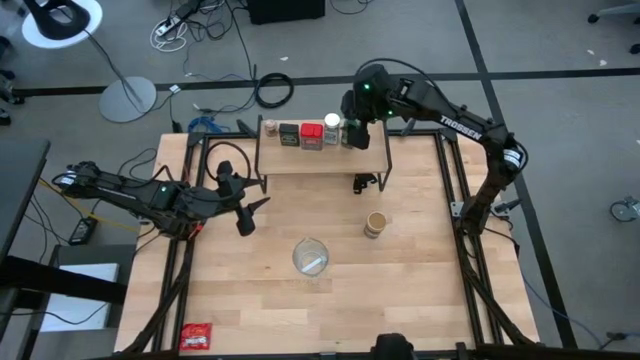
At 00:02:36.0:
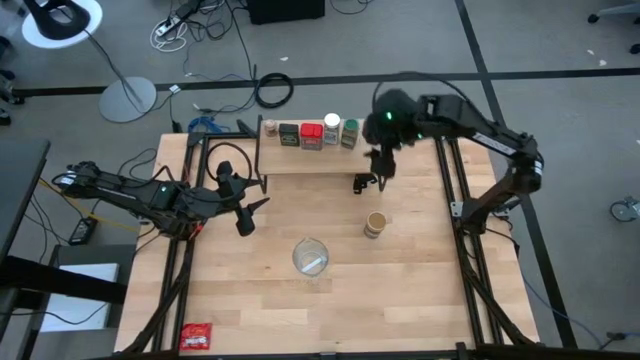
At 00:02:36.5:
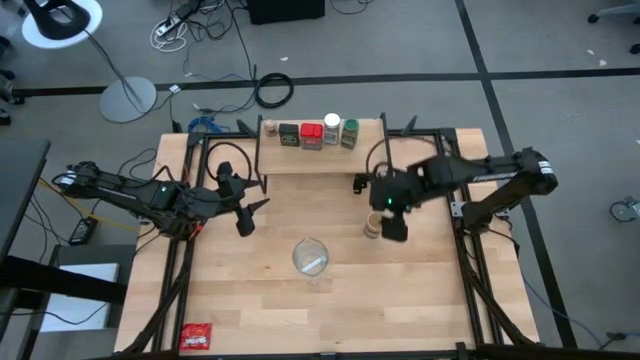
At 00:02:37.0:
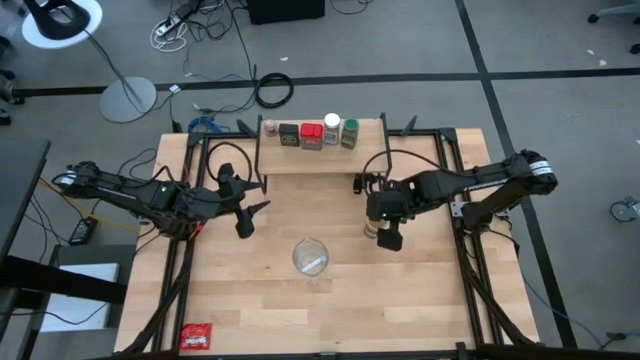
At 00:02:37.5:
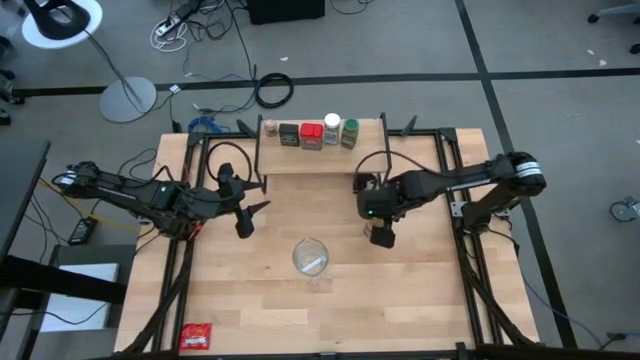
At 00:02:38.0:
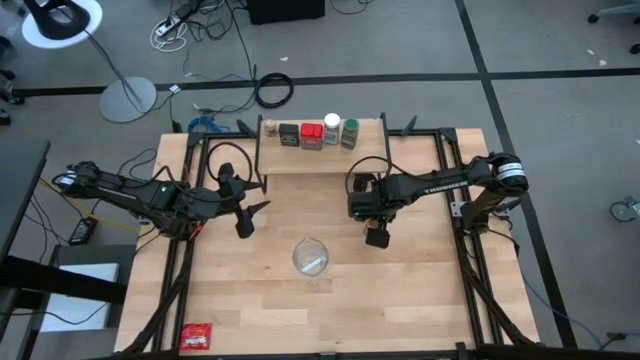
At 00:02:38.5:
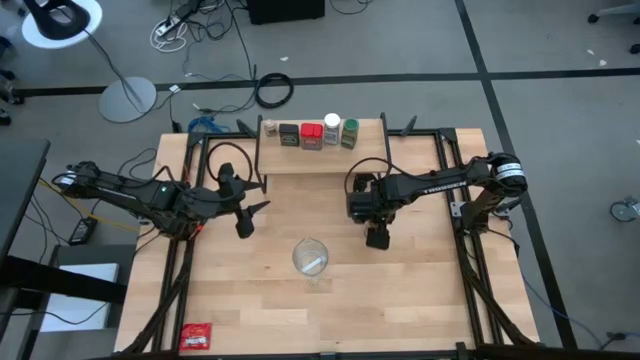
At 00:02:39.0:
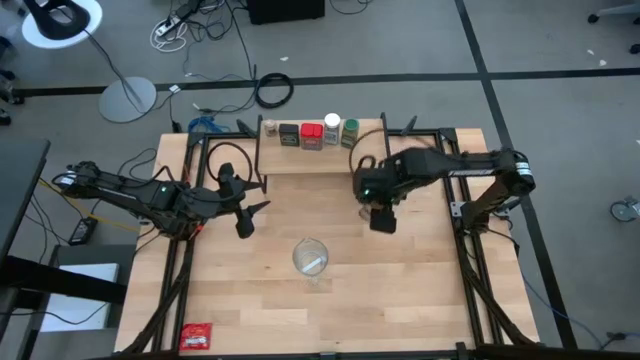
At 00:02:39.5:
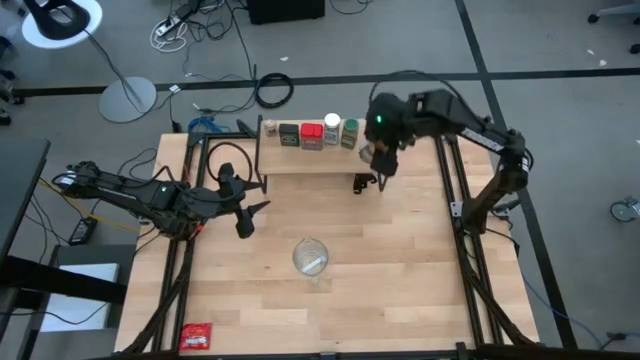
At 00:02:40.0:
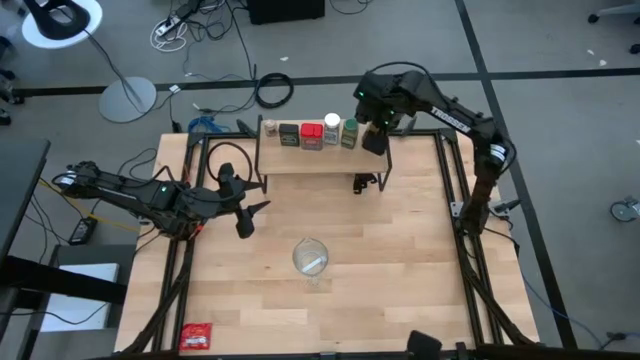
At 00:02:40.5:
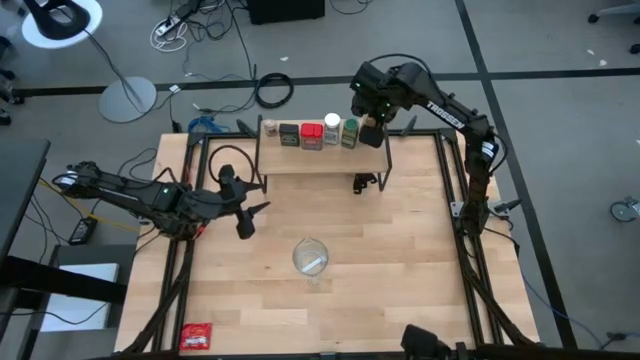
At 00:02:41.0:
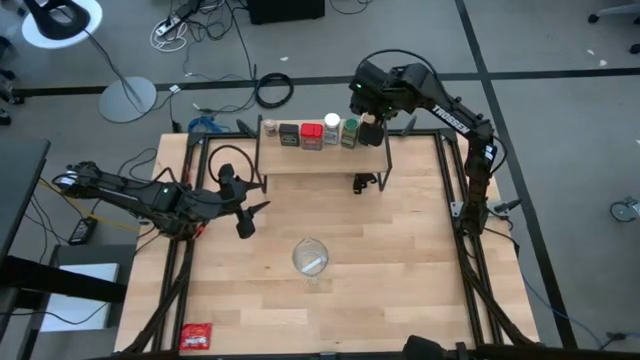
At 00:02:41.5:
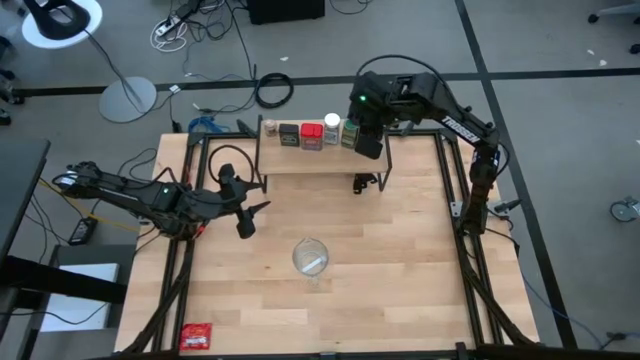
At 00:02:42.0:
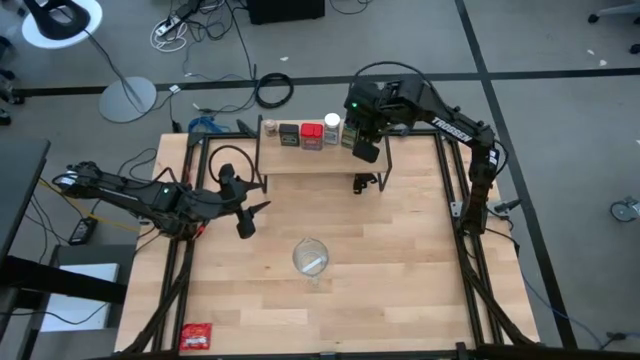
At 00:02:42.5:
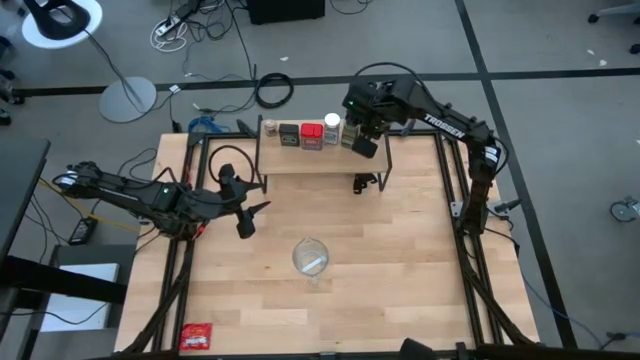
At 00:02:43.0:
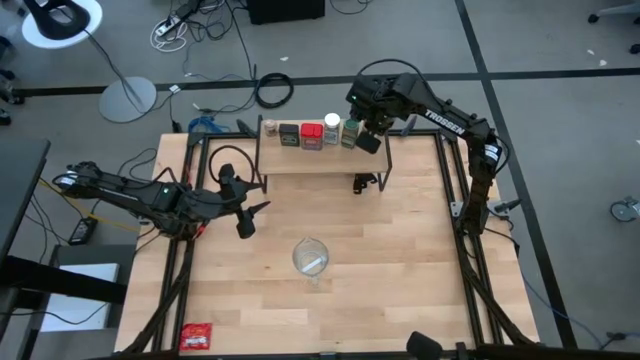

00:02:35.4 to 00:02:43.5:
Task: Shelf spices
Put the golden seasoning bottle on the shelf

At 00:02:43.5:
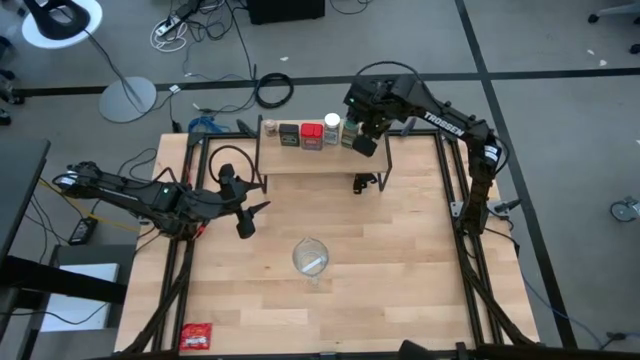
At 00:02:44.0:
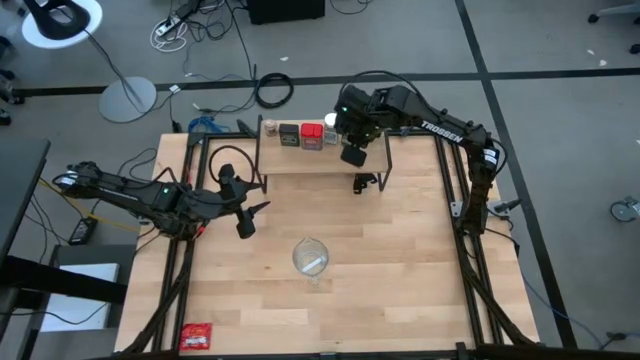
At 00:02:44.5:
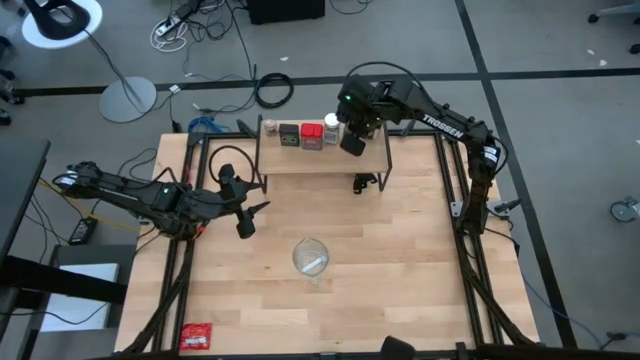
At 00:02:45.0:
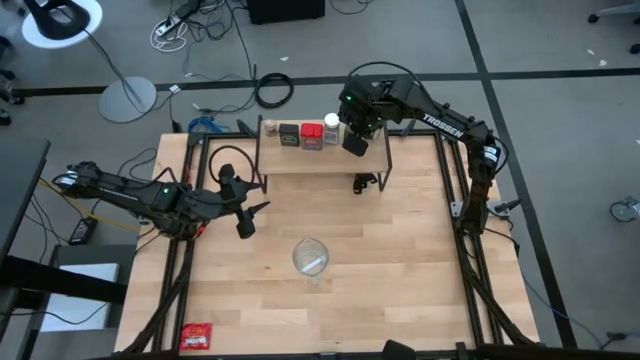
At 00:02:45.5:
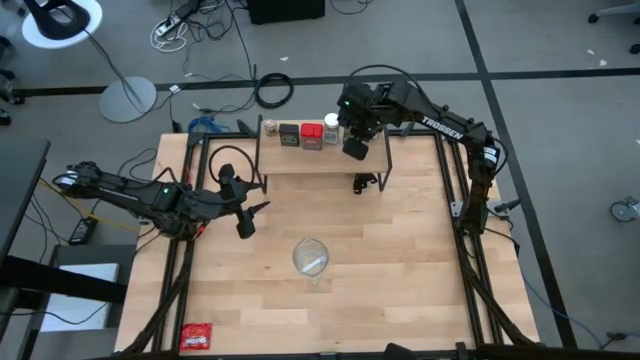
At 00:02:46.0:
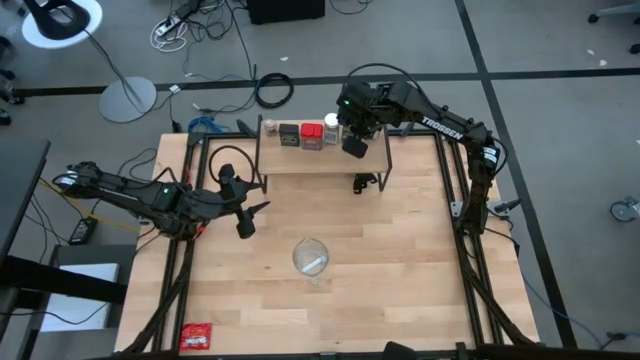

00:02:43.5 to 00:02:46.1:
Adjust the green seasoning bottle on the shelf

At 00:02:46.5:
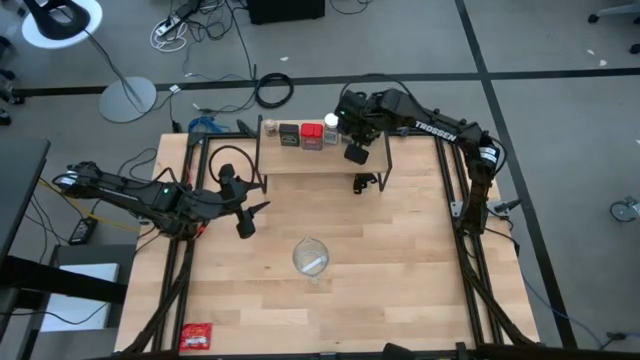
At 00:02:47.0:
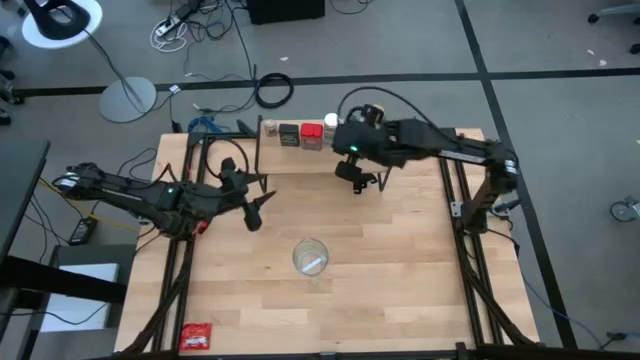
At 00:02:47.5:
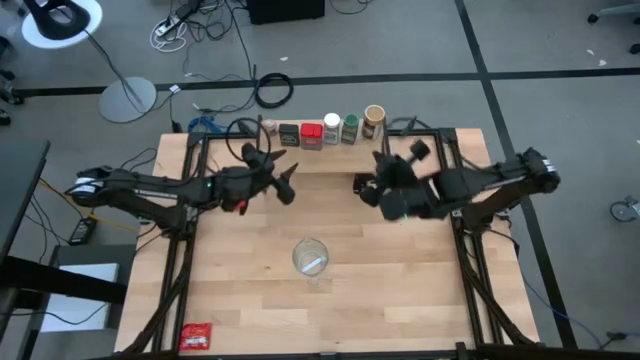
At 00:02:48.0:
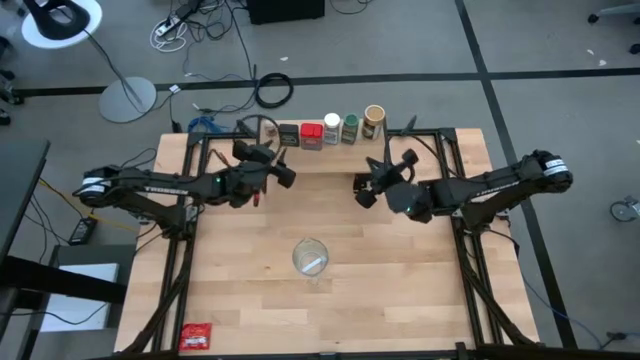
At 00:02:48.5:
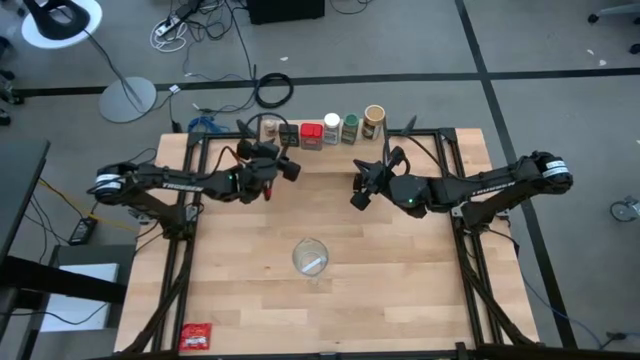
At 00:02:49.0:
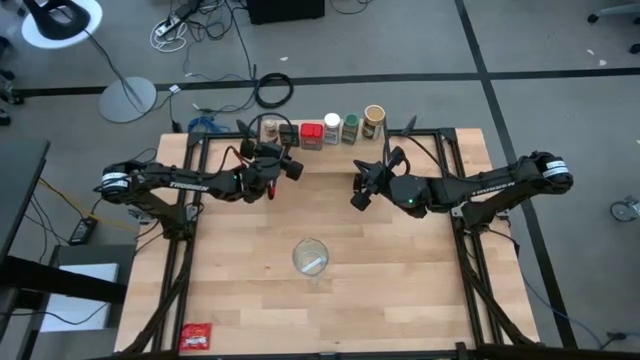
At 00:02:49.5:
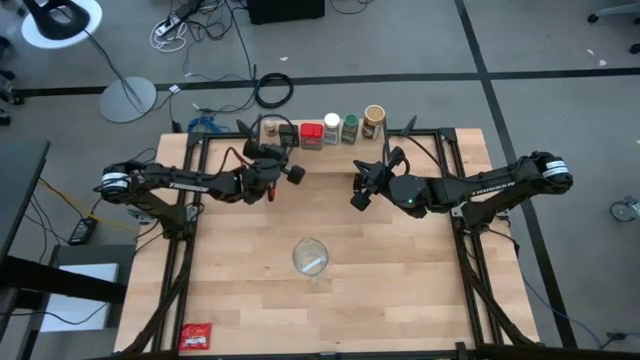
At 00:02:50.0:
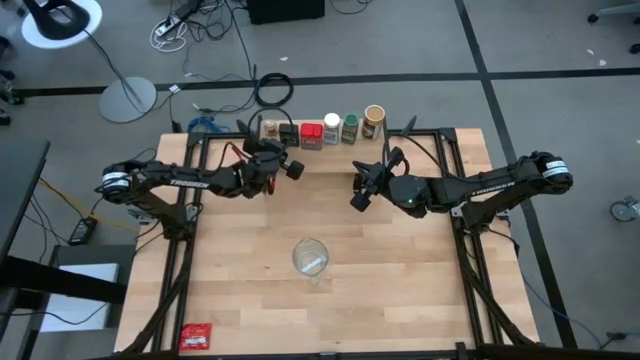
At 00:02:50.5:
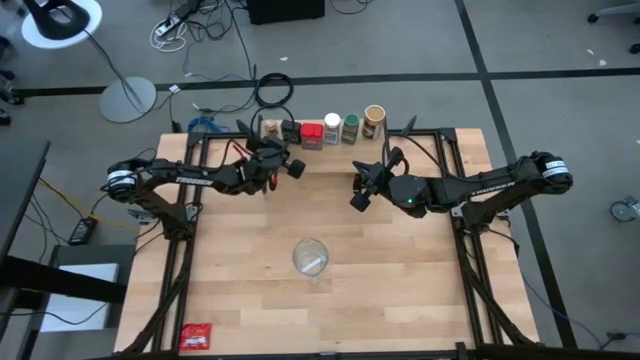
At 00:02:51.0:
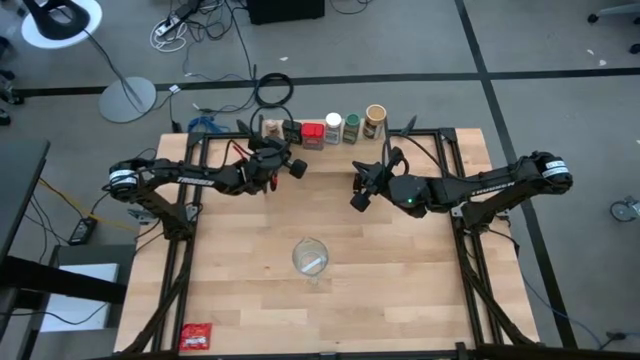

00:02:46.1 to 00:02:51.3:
Adjust the black seasoning can on the shelf

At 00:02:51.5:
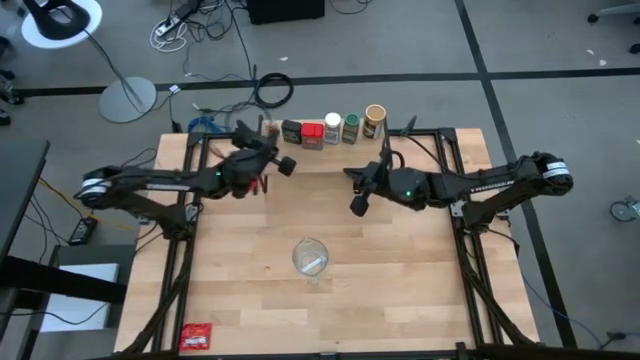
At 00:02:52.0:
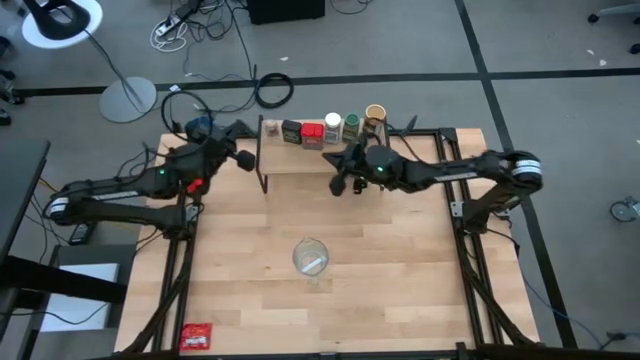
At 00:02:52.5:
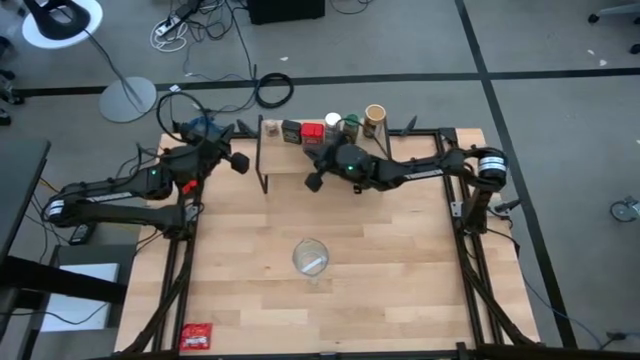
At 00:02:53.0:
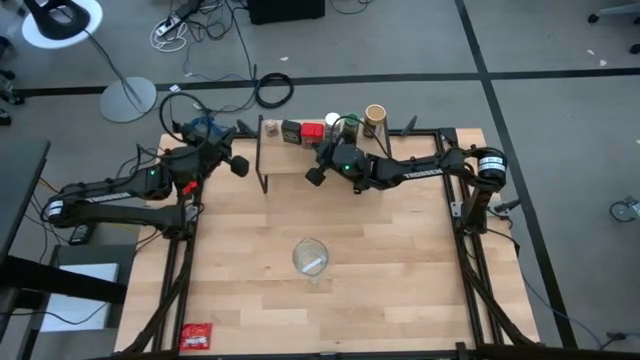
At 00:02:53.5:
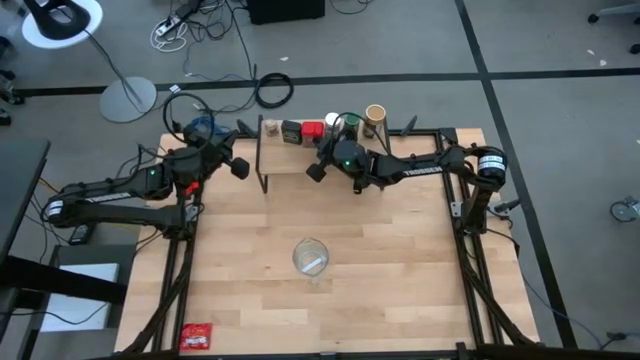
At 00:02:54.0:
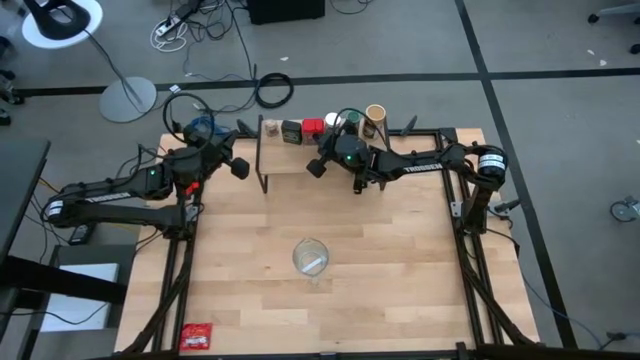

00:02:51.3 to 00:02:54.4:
Adjust the red seasoning can on the shelf
